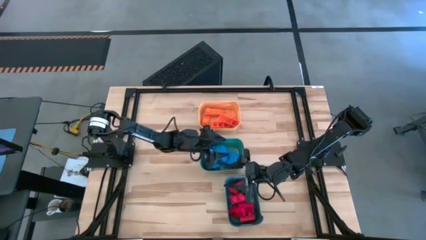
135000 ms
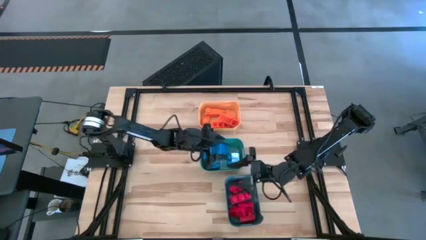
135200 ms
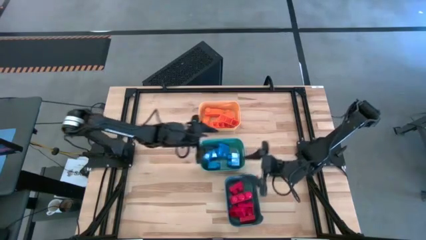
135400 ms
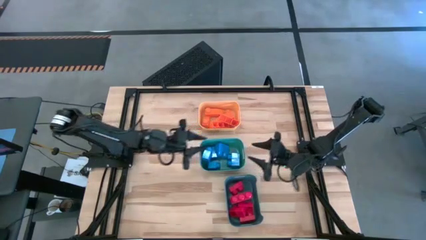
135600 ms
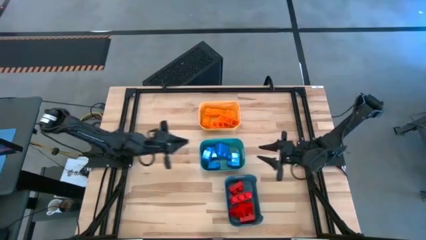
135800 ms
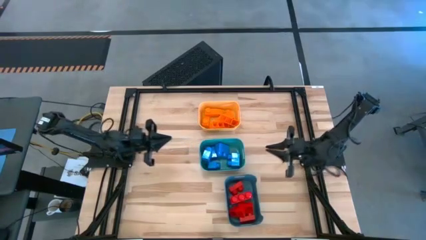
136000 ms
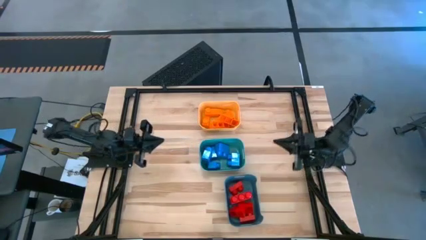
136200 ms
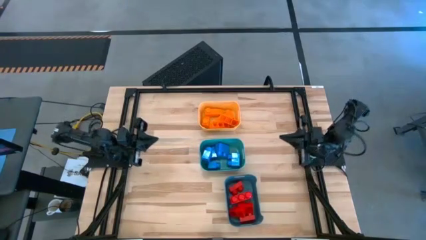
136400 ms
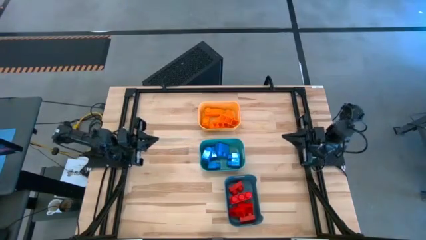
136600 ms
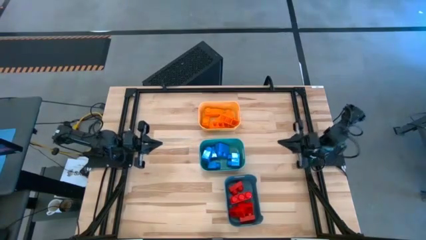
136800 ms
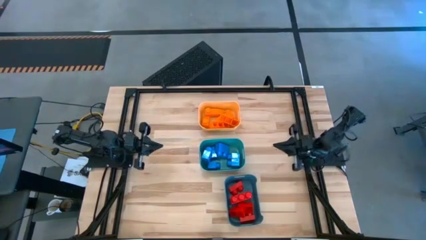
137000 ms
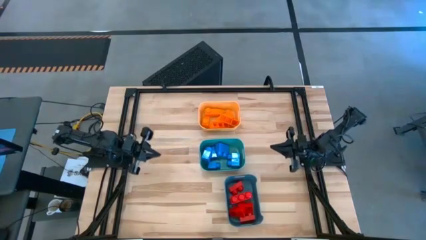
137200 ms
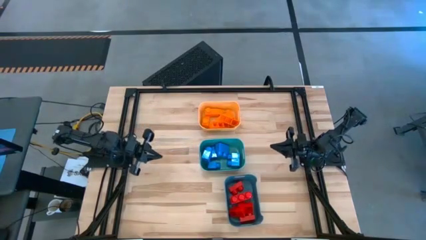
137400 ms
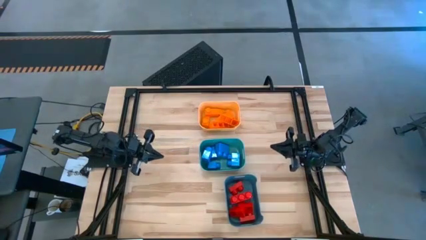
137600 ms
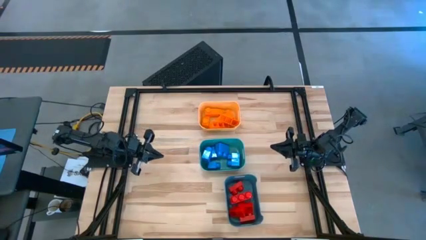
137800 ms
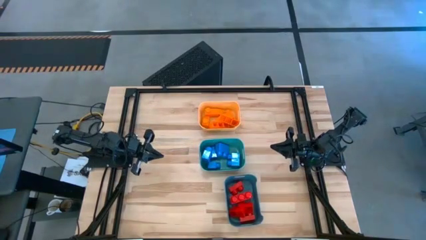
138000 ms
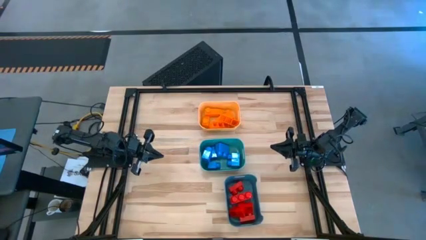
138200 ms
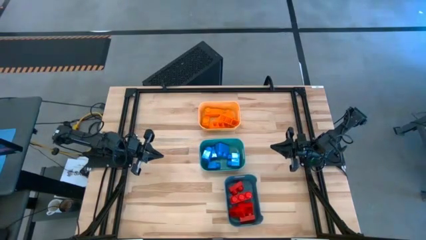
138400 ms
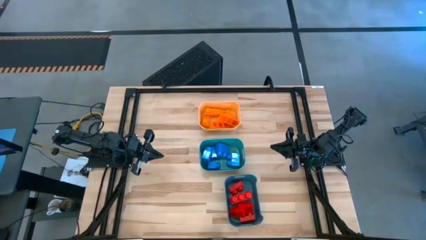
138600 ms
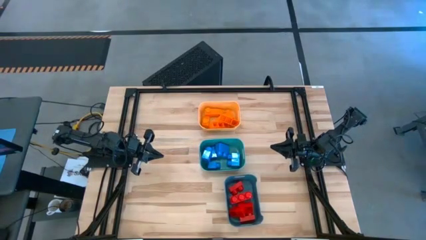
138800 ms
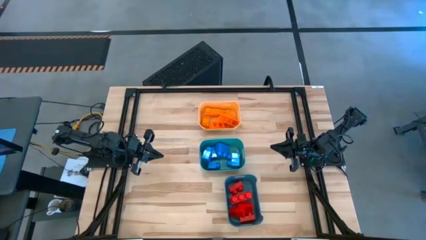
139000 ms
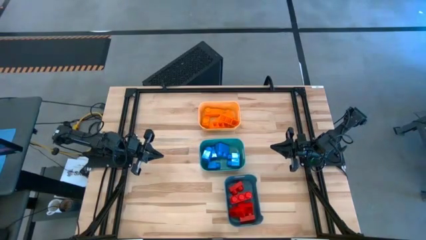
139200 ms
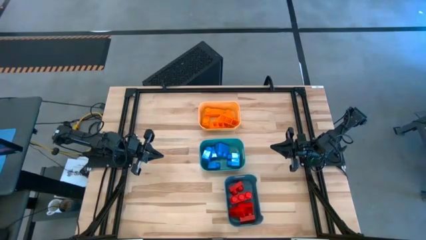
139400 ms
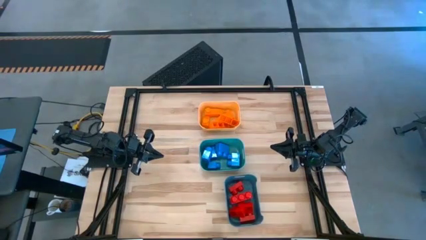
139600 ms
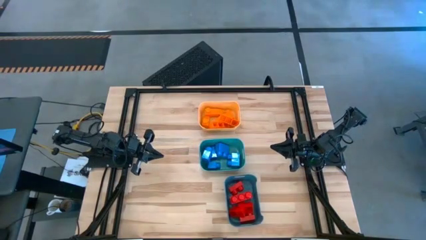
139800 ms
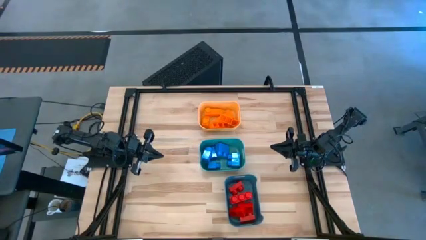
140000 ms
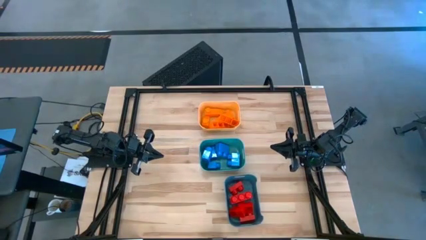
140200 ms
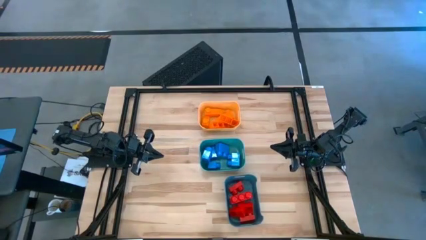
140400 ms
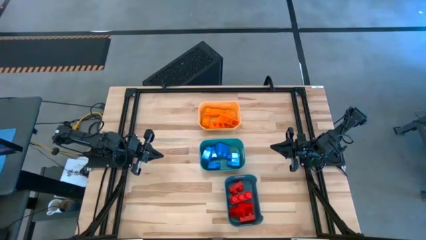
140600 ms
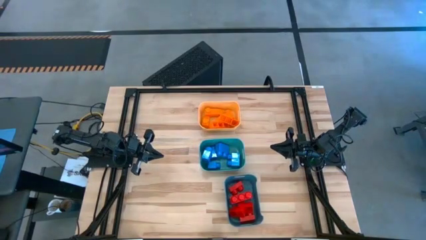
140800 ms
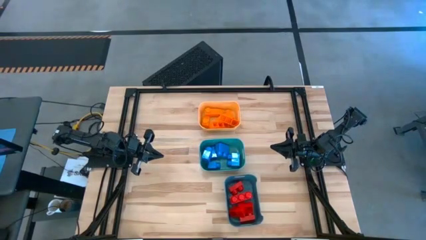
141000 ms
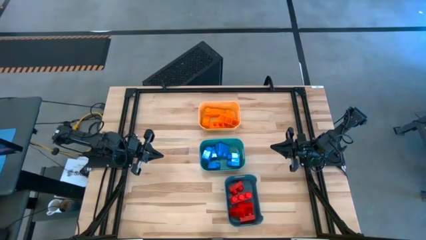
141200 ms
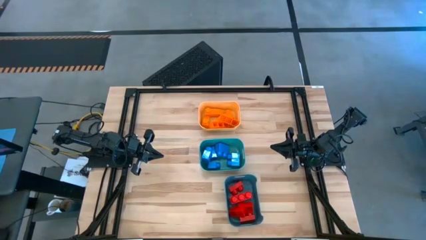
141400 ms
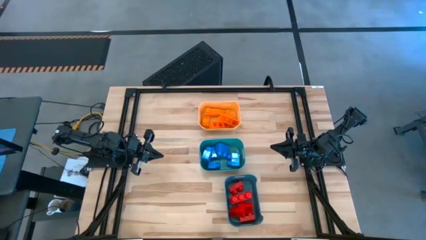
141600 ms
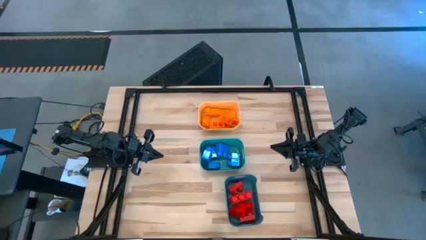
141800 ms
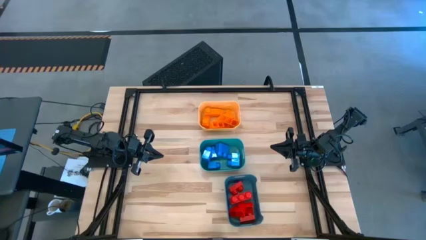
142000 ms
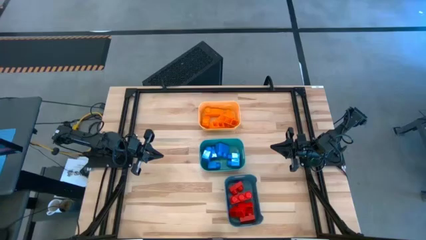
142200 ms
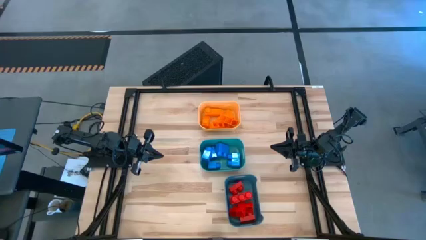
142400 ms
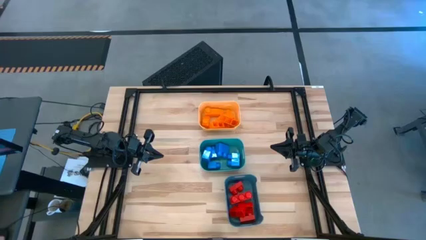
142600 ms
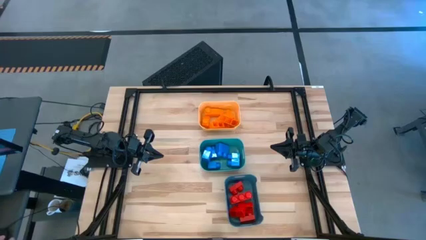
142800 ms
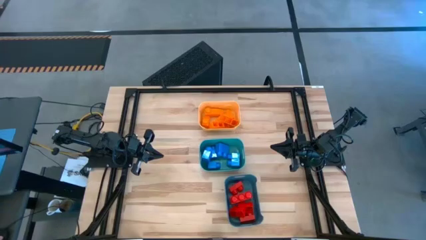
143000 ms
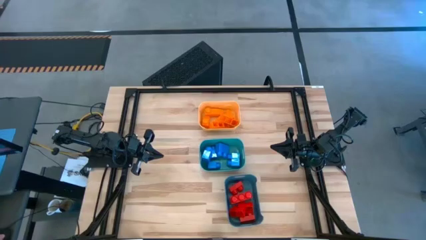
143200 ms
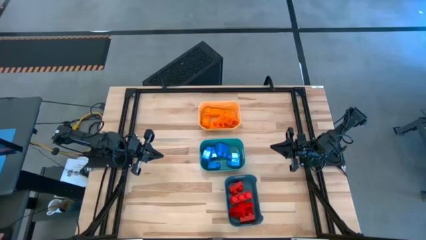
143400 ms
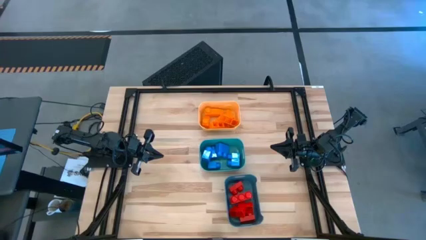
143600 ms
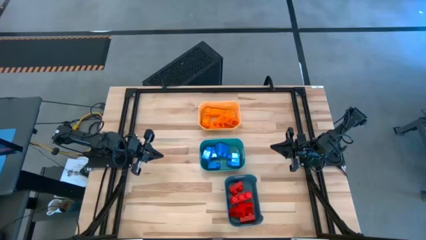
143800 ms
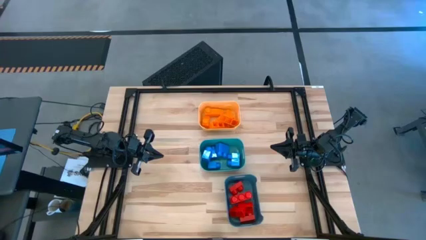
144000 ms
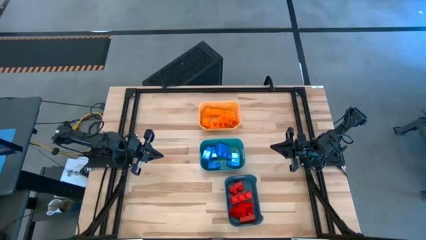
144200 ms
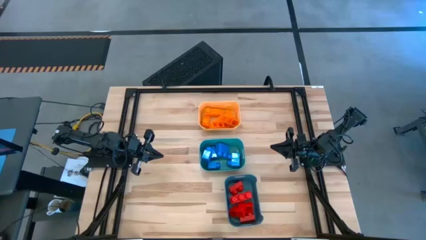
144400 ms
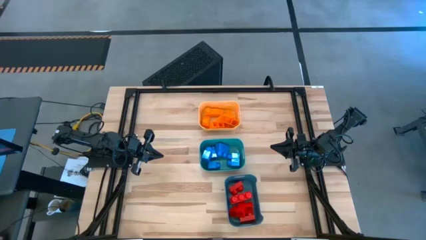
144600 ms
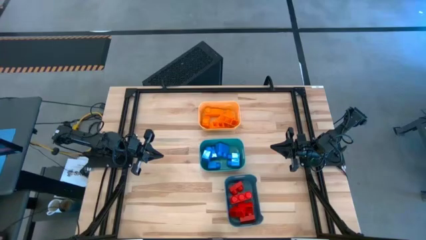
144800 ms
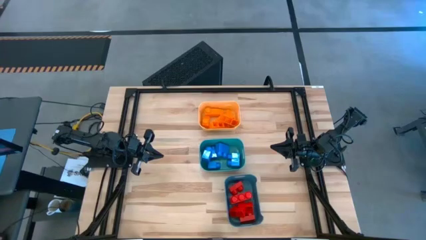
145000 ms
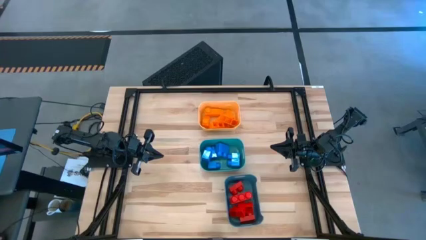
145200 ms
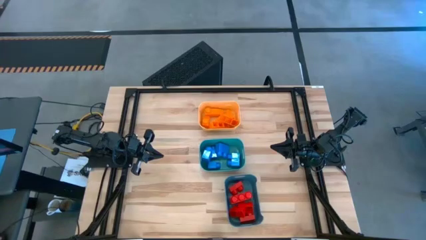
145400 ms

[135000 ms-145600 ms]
Task: Sort & place blocks by color
Return to Home Position

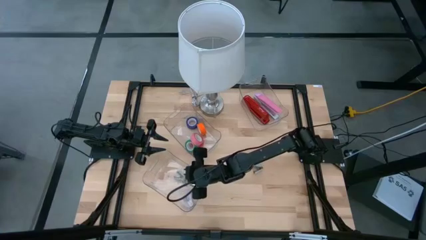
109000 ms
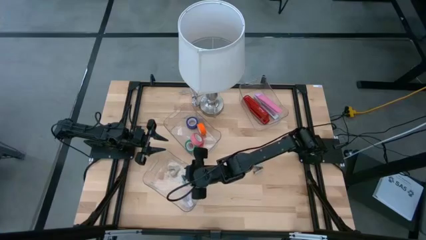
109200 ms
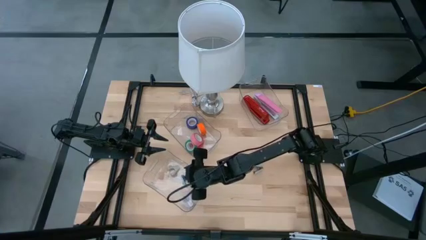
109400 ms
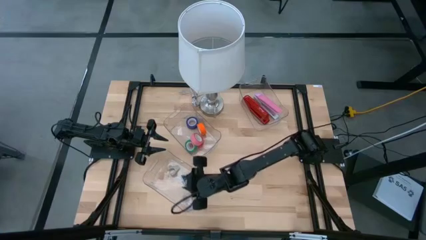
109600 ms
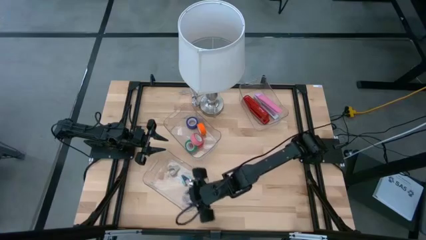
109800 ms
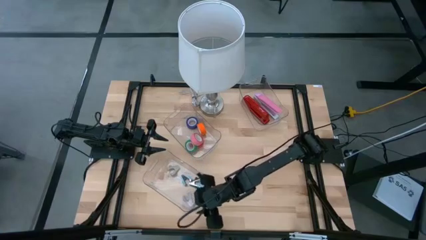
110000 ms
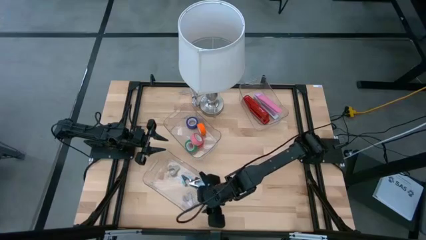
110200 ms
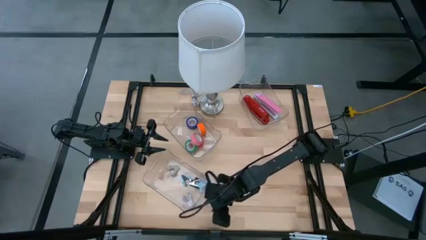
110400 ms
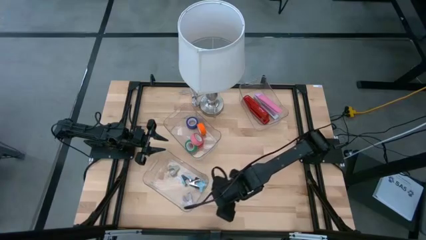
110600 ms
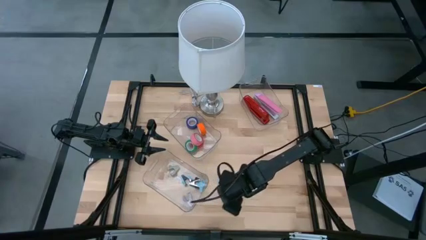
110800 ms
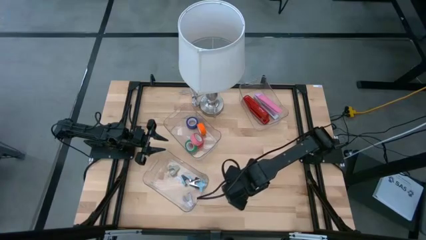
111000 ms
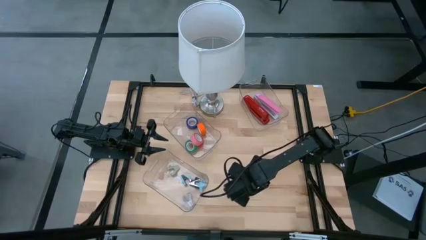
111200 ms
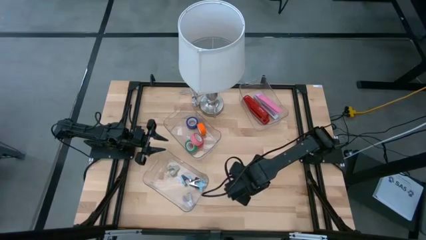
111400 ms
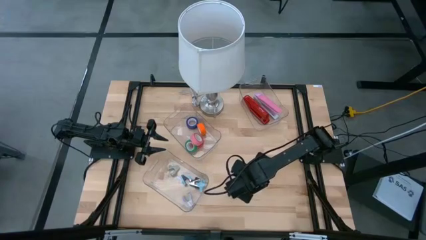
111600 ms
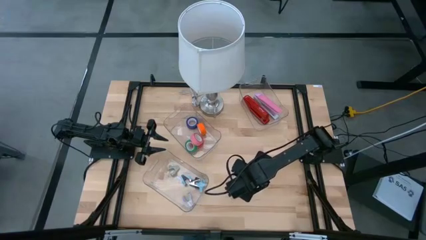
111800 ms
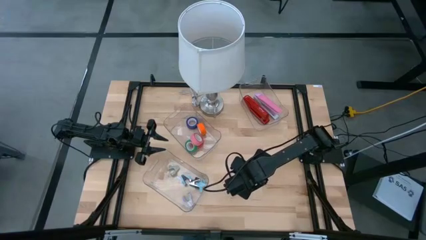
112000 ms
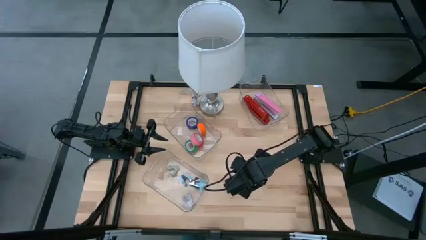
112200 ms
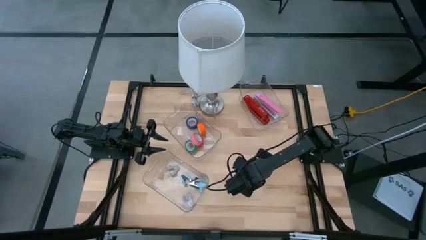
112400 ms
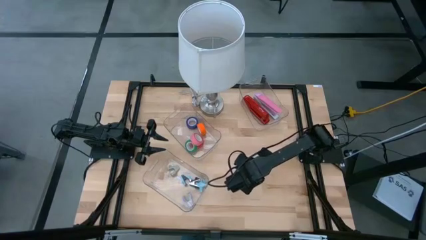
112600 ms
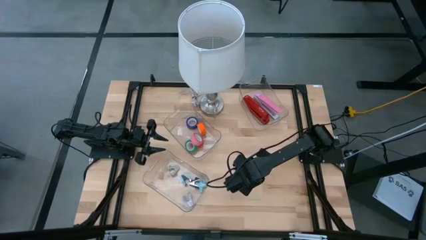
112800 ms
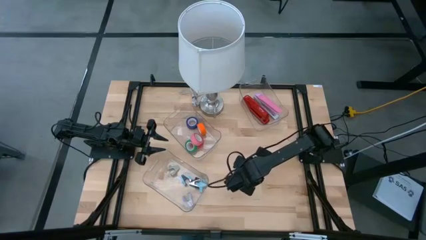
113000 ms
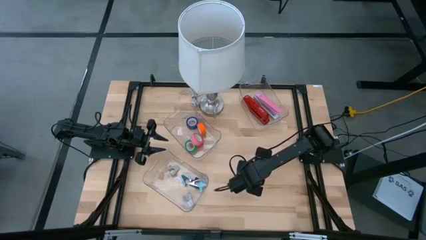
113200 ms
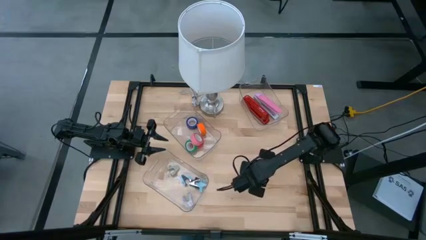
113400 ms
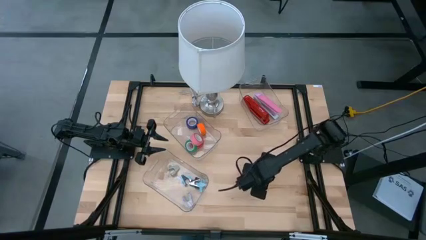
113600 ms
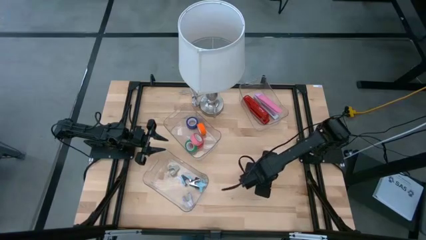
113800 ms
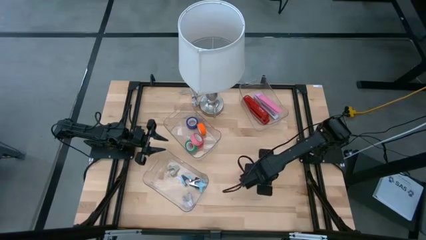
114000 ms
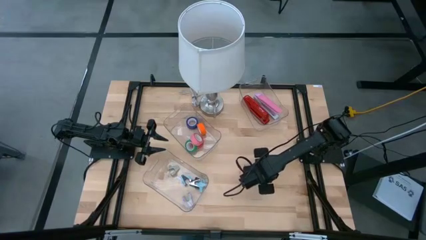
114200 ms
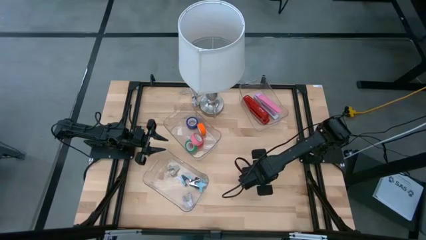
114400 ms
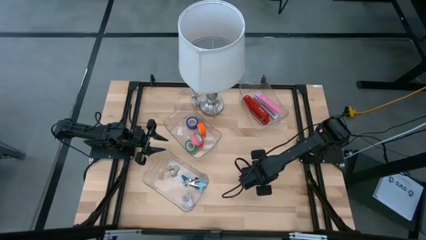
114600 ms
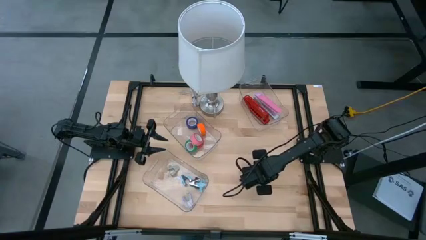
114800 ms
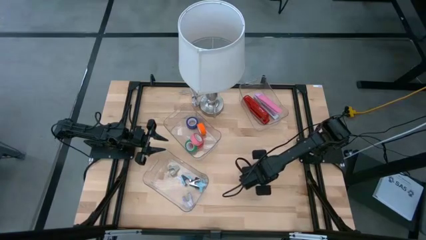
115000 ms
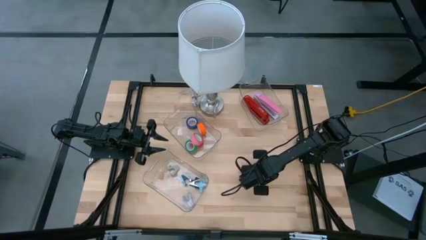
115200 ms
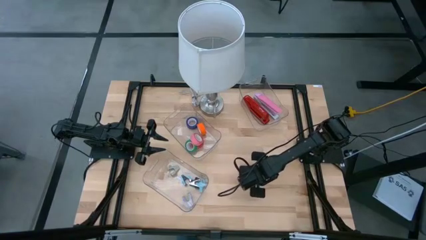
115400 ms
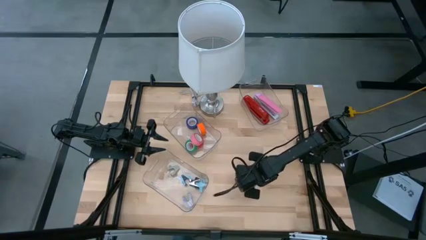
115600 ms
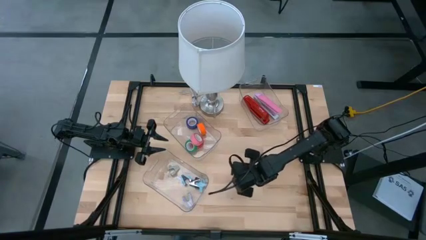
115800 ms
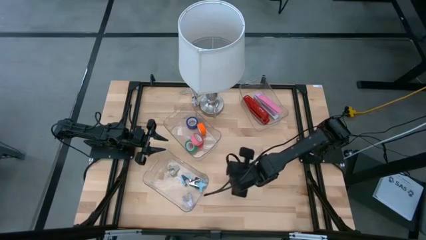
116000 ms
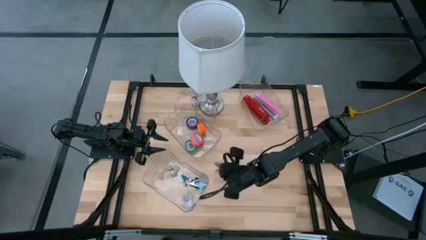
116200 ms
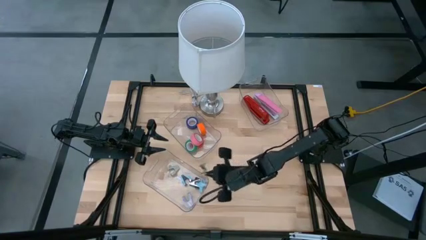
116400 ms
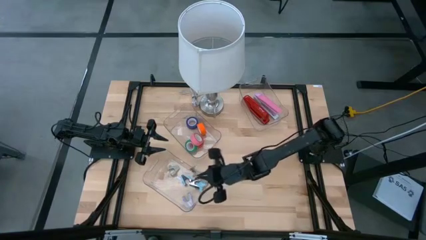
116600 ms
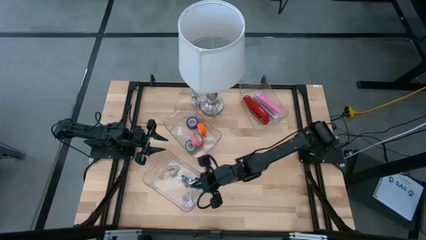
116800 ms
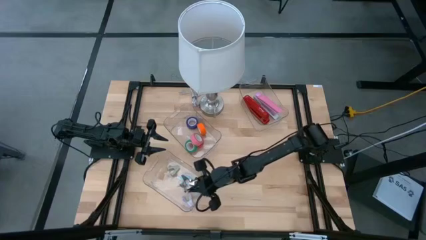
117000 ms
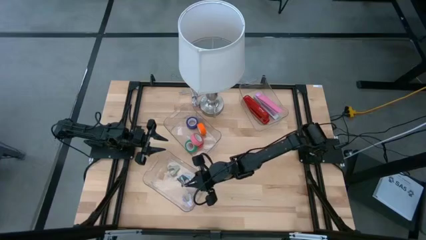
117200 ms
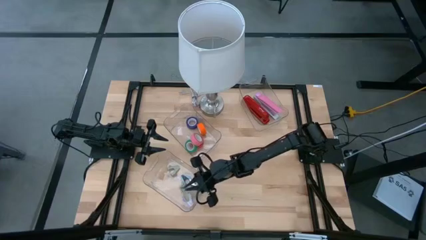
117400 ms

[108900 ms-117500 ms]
Task: Pick and place Stapler, Stapler remover, tape
Put the gray staple remover into the bottom transparent bin
